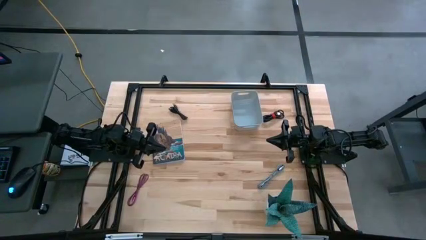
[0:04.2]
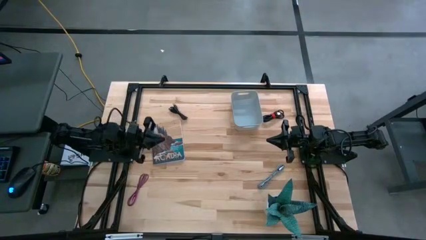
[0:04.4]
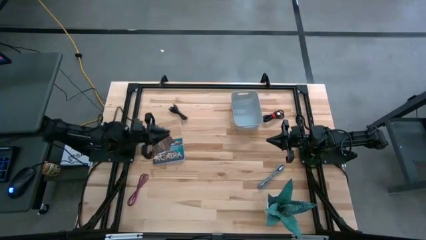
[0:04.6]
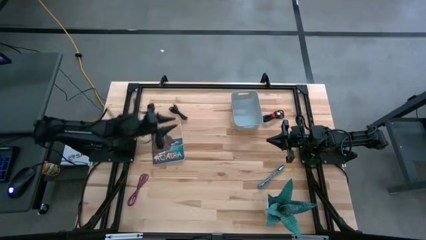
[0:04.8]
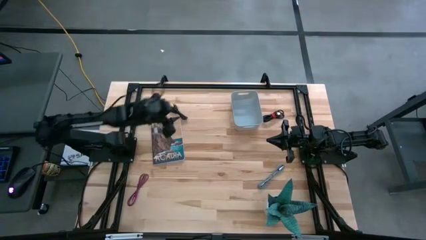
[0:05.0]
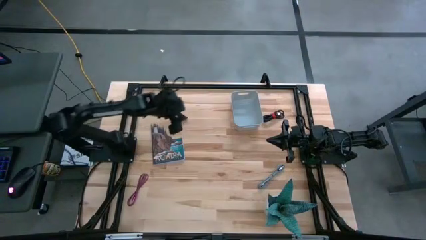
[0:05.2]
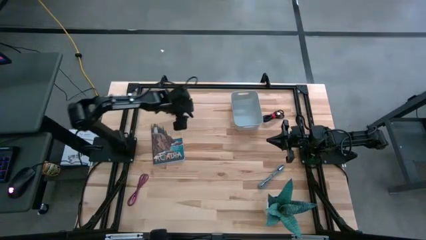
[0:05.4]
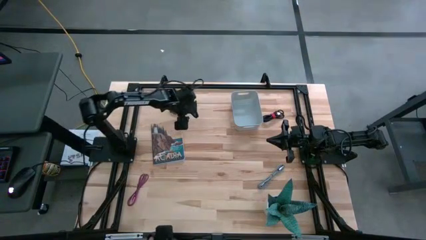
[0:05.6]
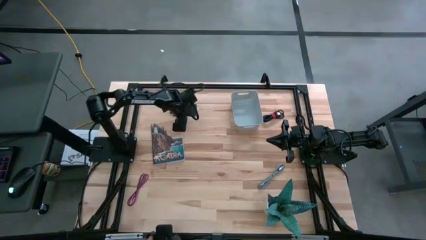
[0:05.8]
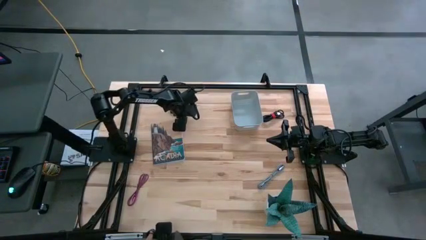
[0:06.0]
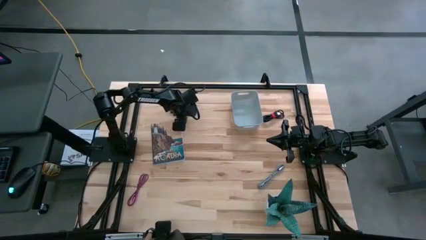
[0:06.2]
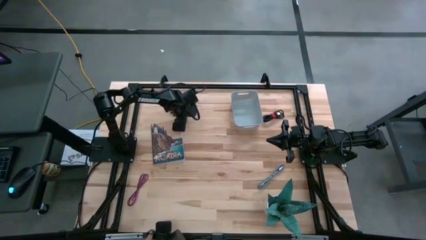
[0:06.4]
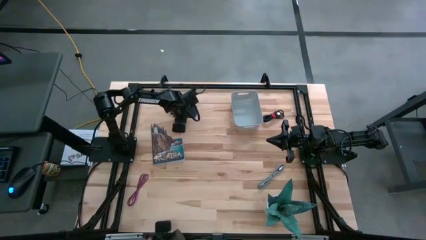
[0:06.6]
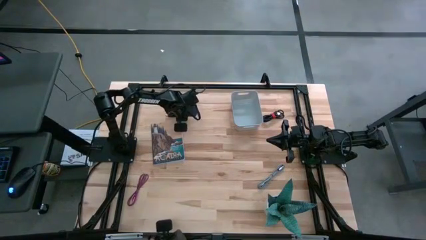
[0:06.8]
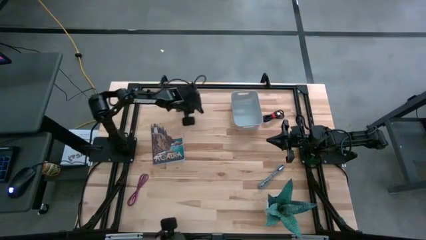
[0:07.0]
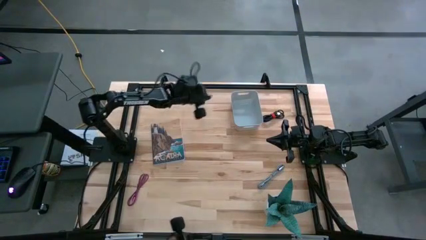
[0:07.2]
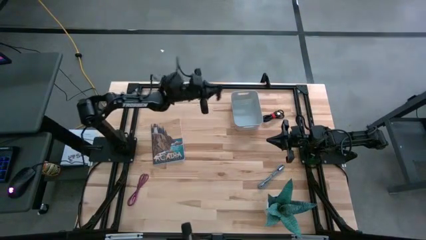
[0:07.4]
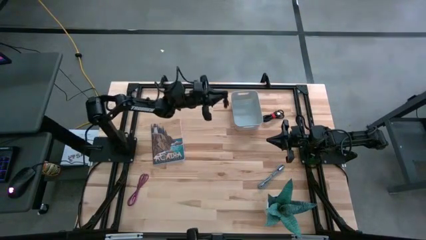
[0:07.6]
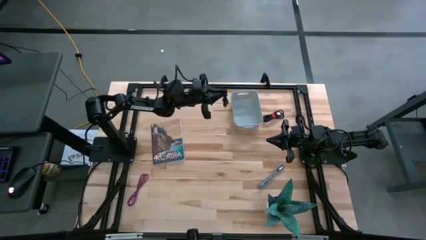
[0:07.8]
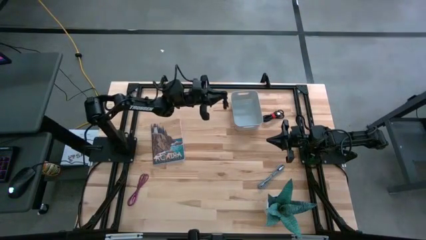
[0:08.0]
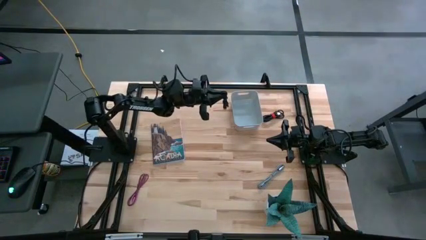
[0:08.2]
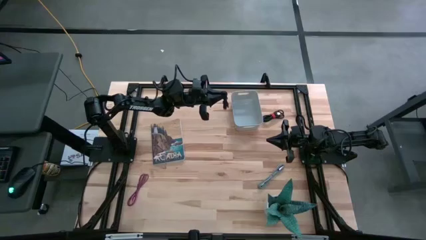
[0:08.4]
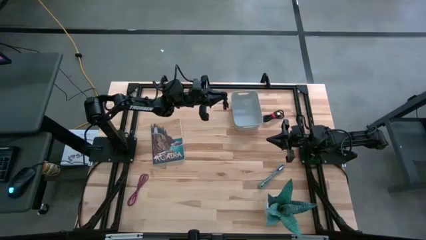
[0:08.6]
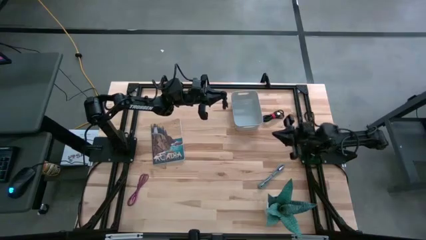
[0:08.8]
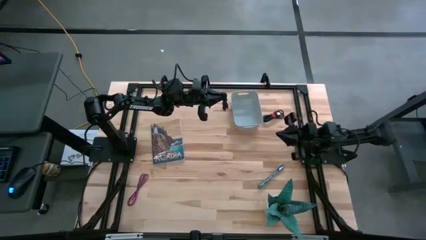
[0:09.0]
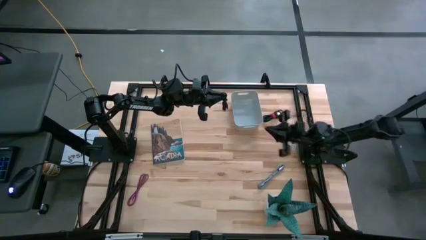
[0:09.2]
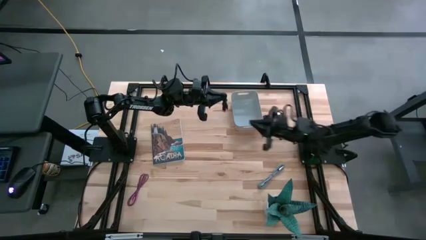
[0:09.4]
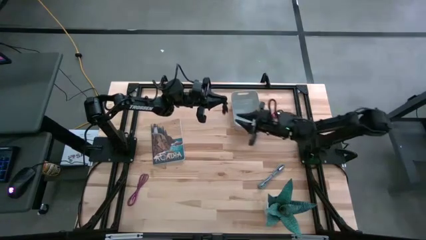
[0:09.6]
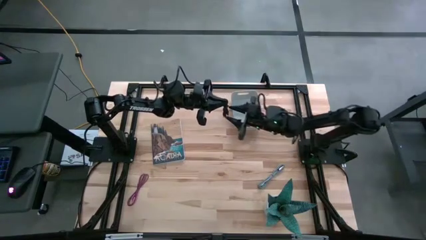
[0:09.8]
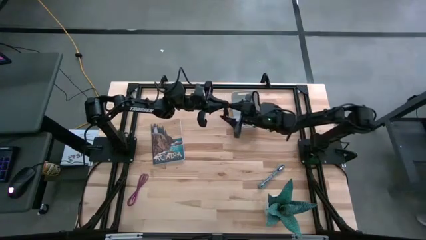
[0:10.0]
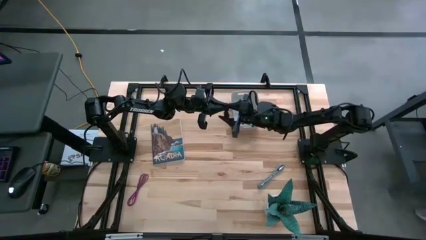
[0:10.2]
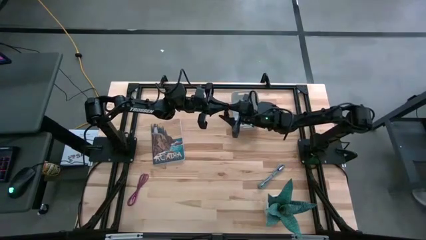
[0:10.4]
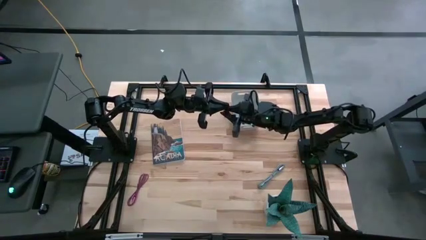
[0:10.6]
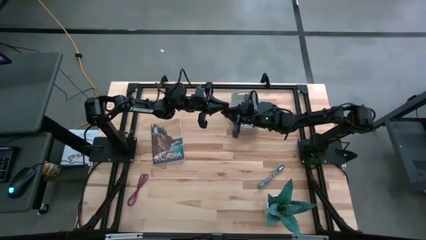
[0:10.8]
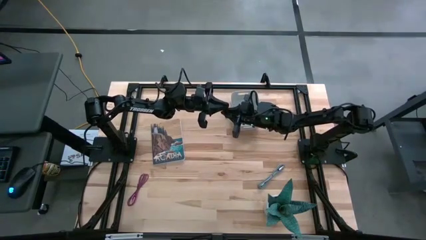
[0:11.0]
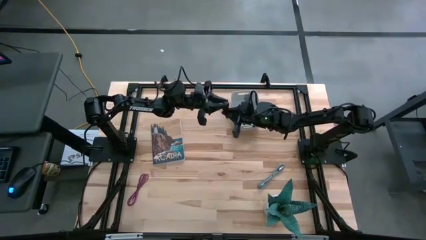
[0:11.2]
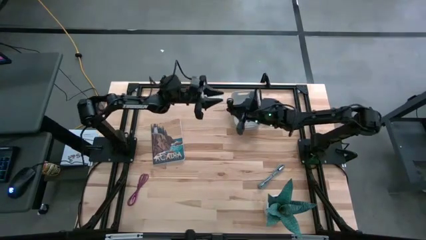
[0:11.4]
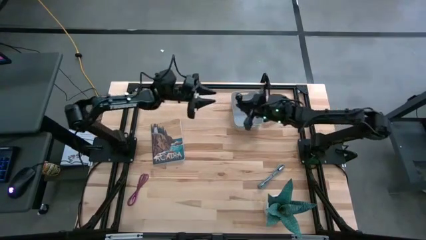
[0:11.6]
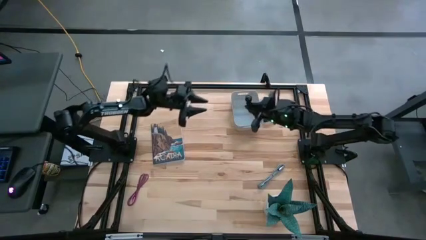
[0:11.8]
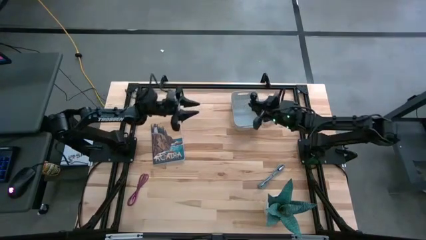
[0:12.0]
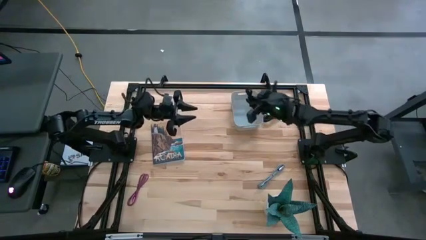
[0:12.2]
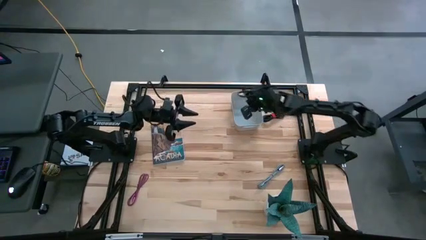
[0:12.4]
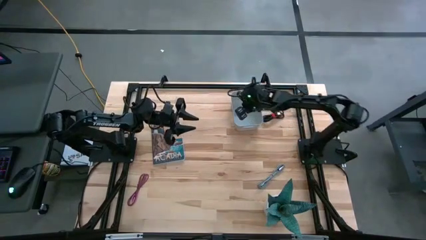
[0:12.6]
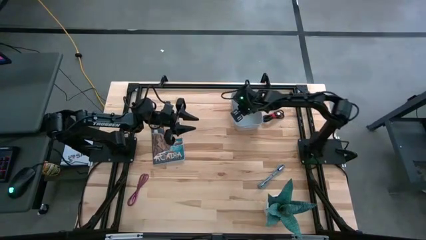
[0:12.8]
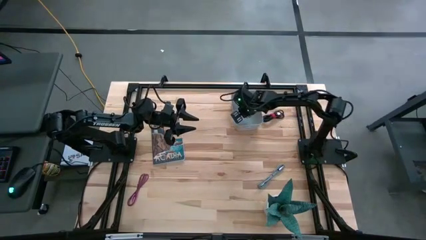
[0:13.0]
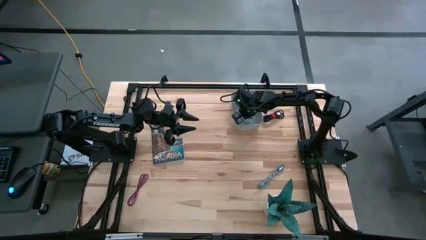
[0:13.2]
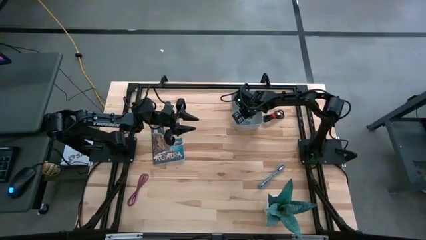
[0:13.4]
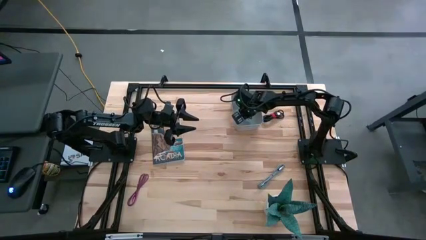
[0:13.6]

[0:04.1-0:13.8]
Task: Pick and place USB-C Cables
Put the left black usb cable into the white bin

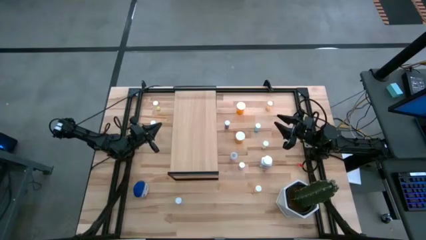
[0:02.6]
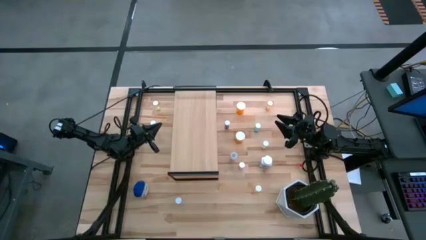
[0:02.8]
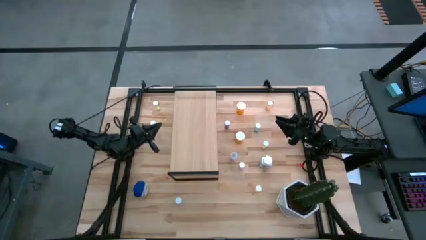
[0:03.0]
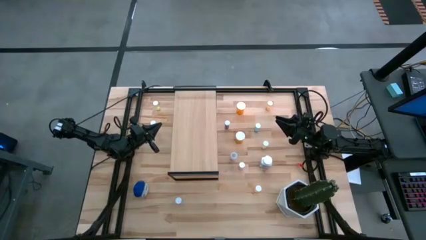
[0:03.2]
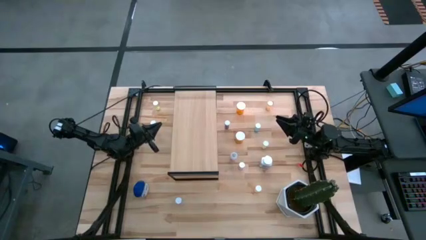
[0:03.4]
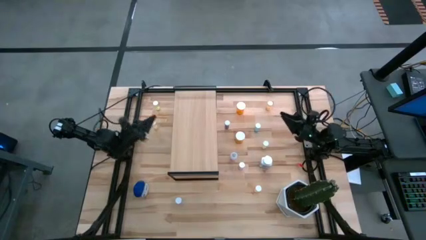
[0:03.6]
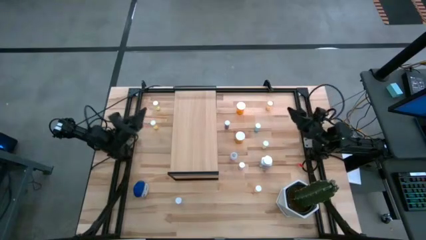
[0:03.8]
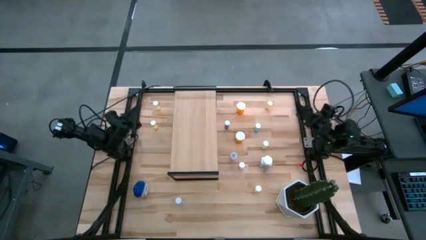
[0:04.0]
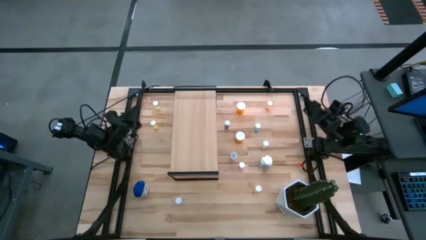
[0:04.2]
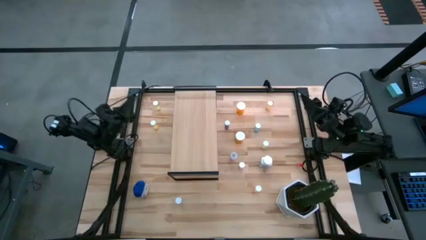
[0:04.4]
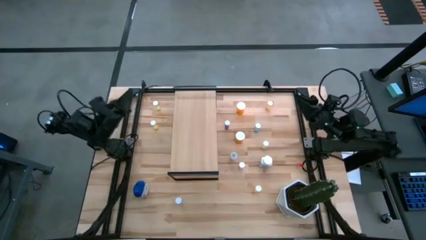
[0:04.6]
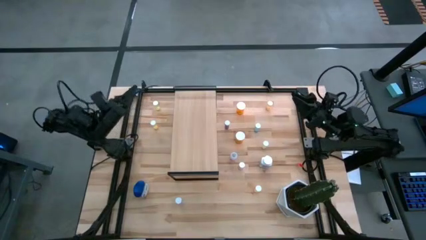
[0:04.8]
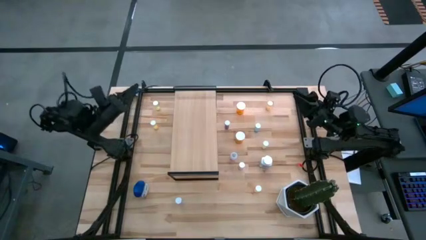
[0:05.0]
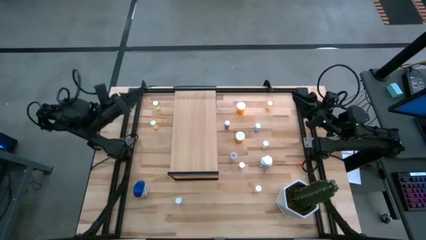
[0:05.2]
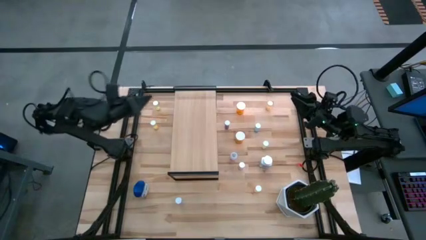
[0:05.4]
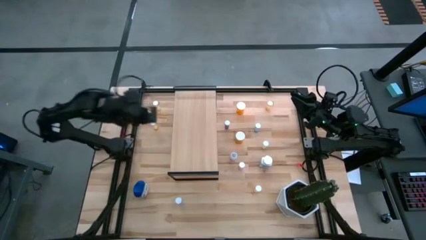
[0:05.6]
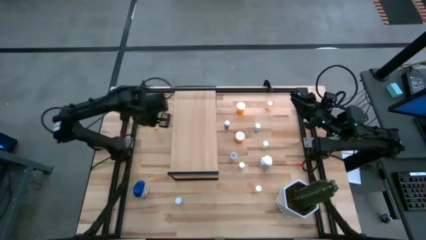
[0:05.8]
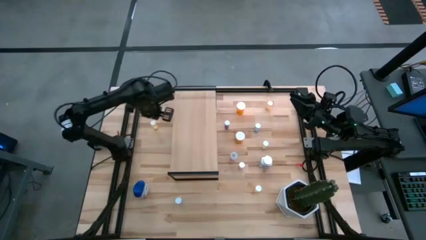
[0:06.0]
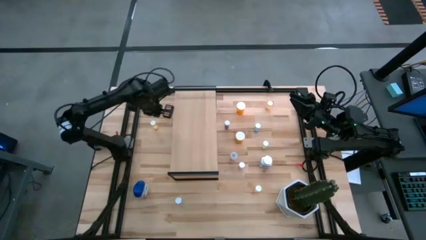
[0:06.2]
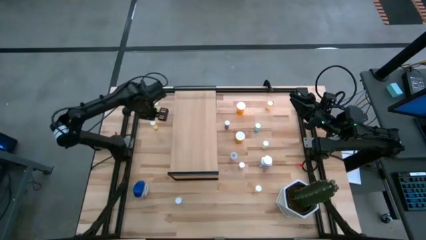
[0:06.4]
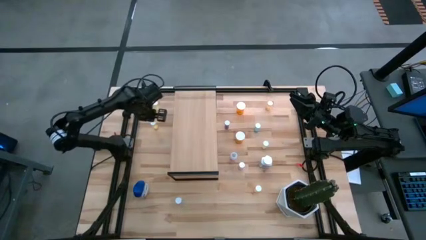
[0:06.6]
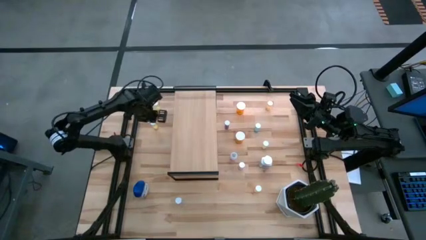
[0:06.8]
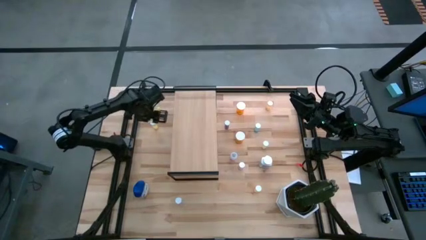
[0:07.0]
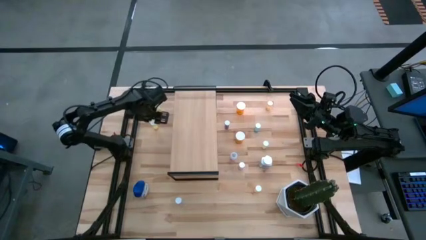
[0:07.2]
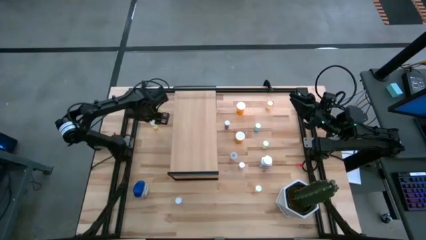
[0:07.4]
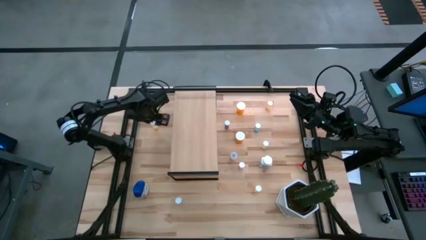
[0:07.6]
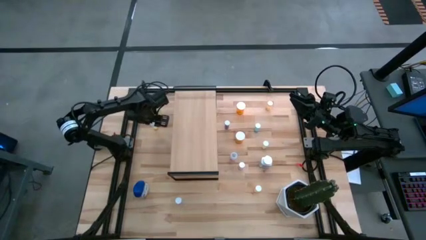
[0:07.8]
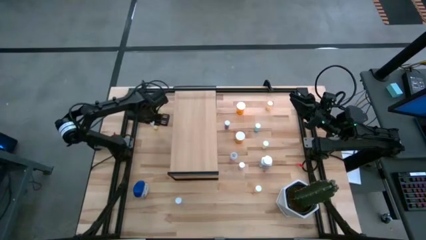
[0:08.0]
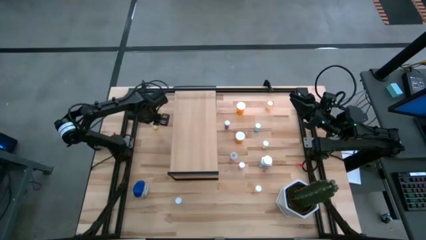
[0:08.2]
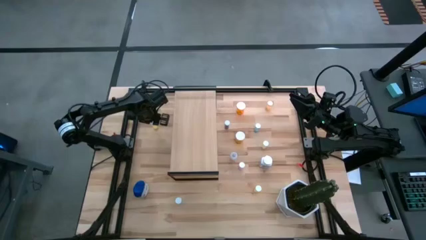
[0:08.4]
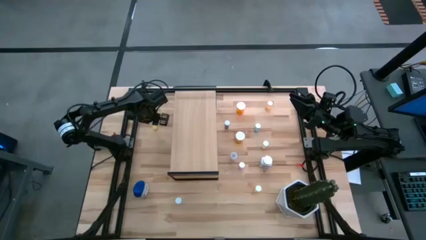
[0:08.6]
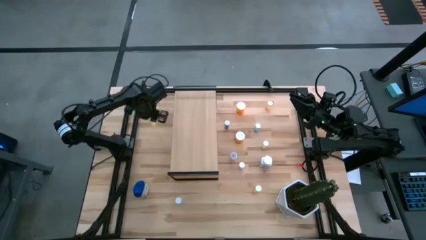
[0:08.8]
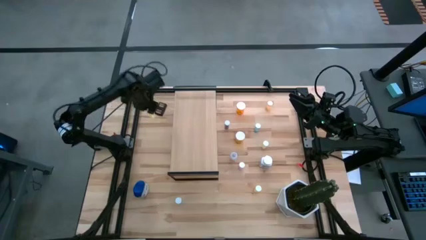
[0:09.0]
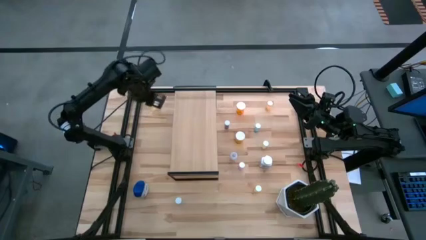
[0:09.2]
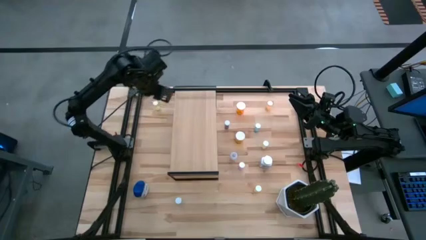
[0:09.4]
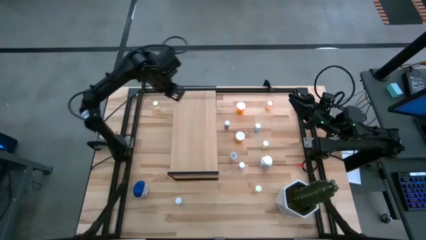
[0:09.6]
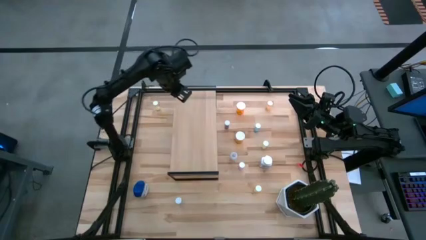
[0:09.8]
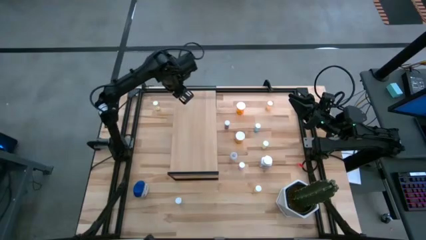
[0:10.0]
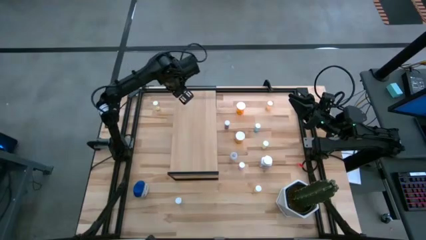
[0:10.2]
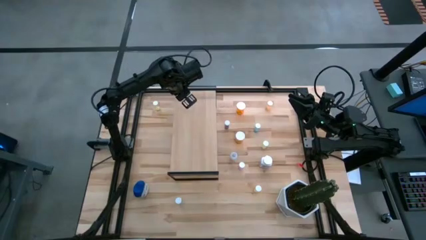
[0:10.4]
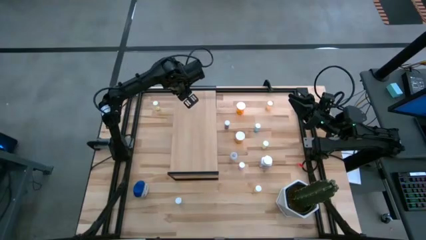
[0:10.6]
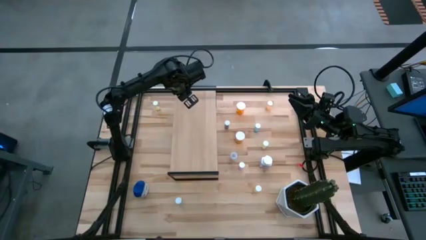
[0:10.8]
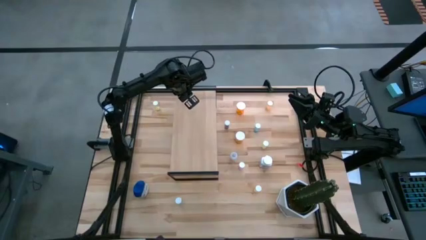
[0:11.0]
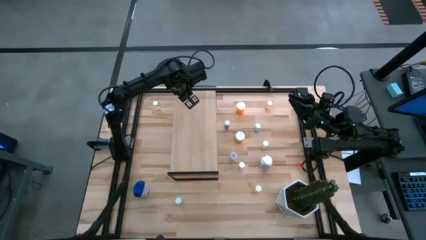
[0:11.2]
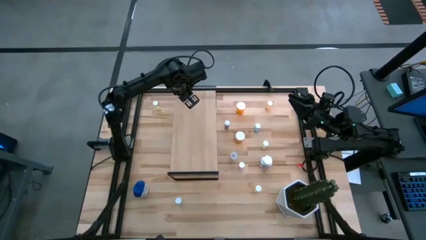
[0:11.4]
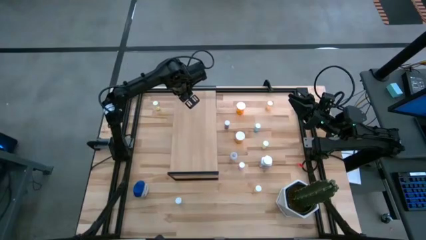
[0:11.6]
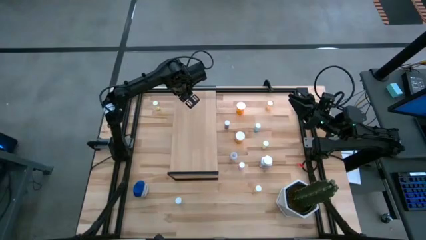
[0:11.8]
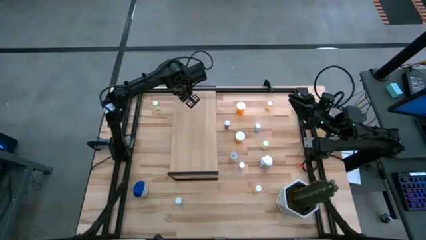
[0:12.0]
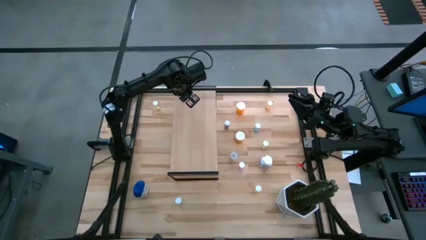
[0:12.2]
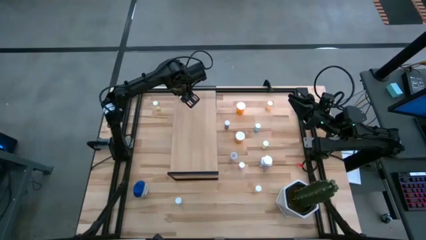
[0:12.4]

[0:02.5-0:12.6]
Task: Pick and place medicine bottles onto shelf by color
Put the left bottom yellow tablet bottle on the shelf
